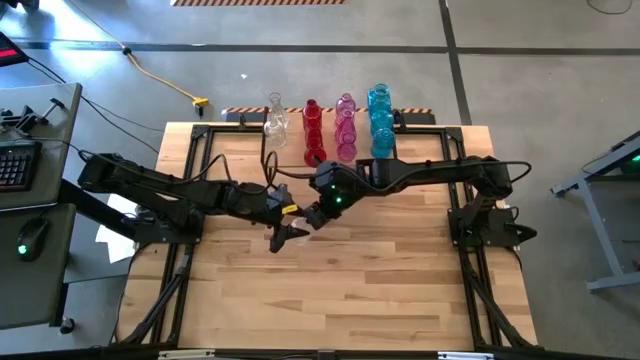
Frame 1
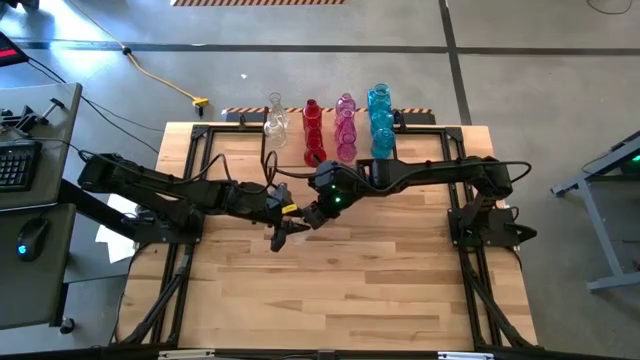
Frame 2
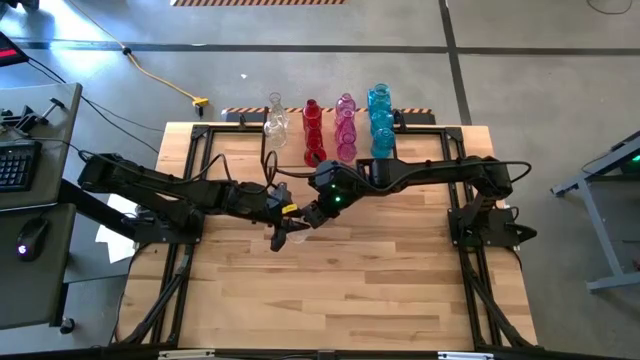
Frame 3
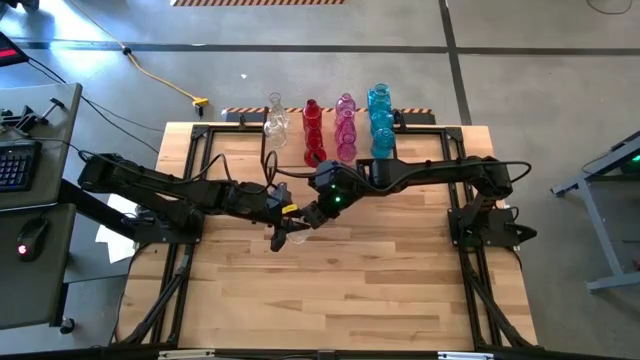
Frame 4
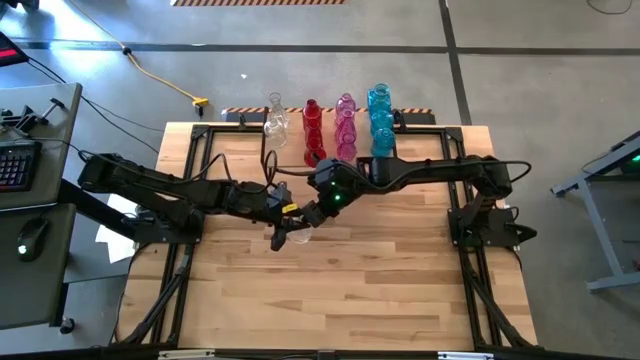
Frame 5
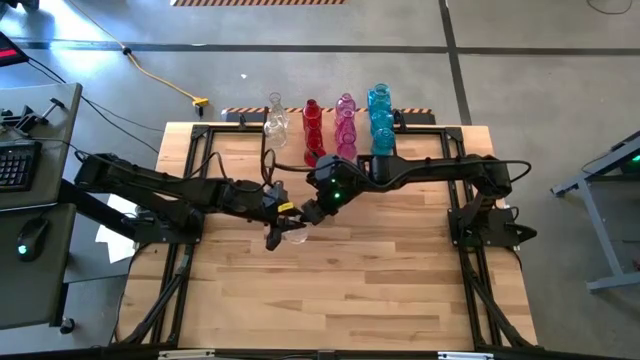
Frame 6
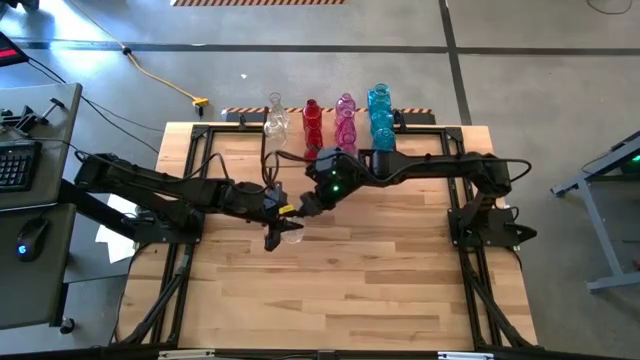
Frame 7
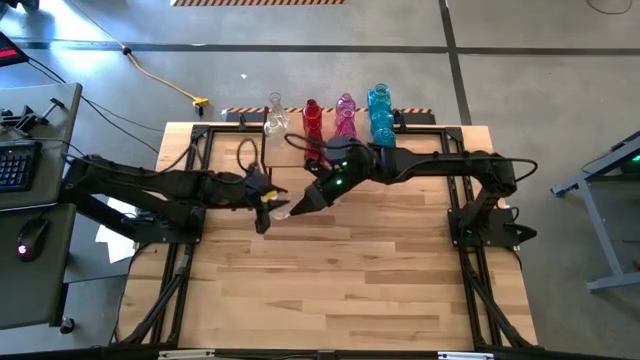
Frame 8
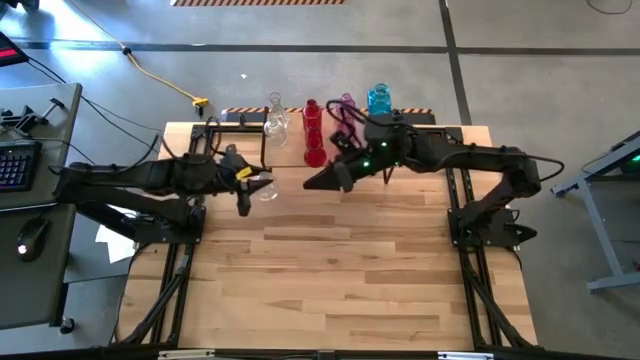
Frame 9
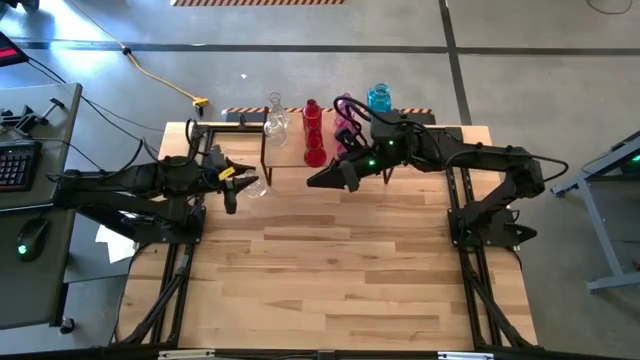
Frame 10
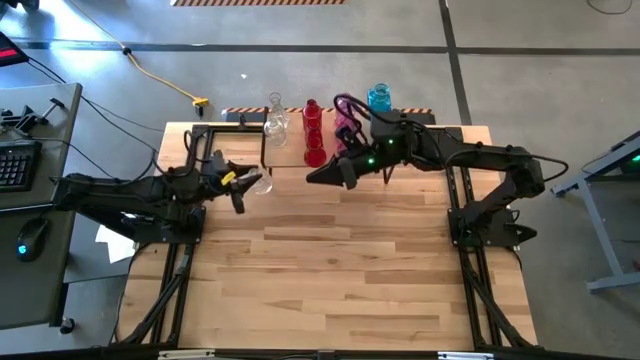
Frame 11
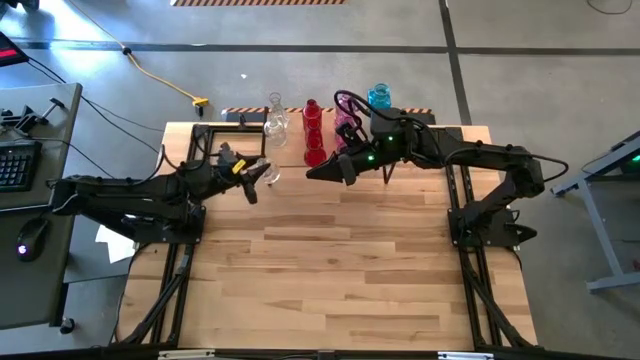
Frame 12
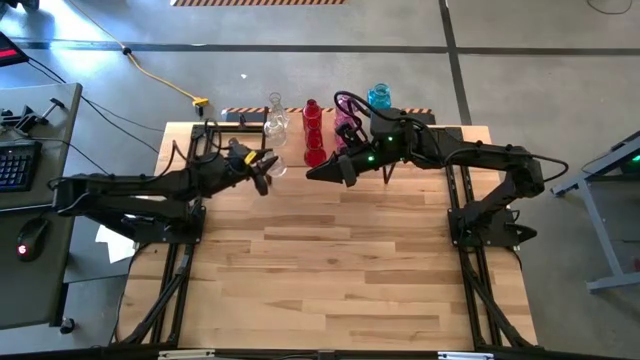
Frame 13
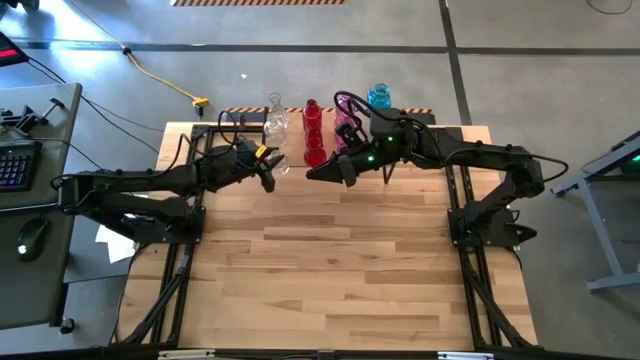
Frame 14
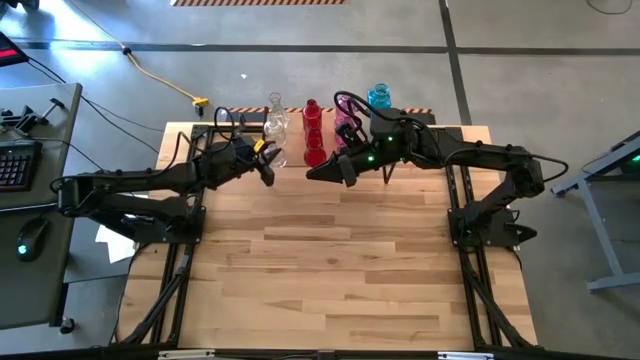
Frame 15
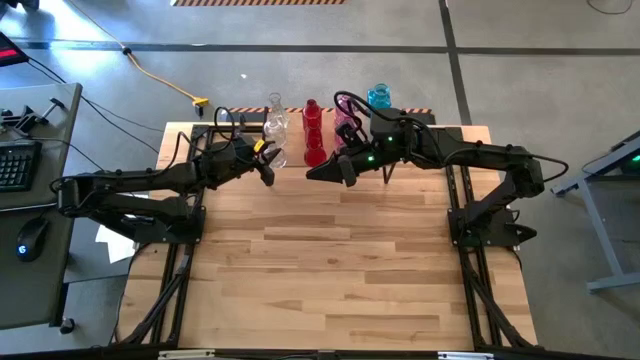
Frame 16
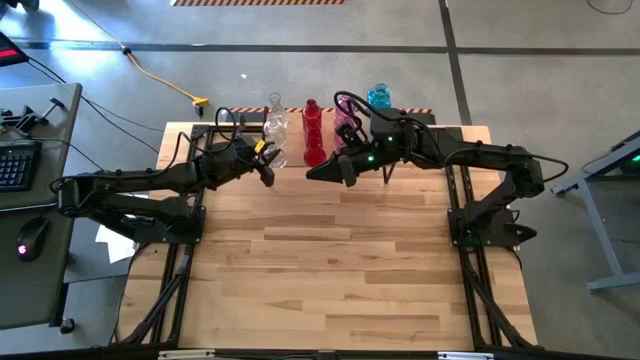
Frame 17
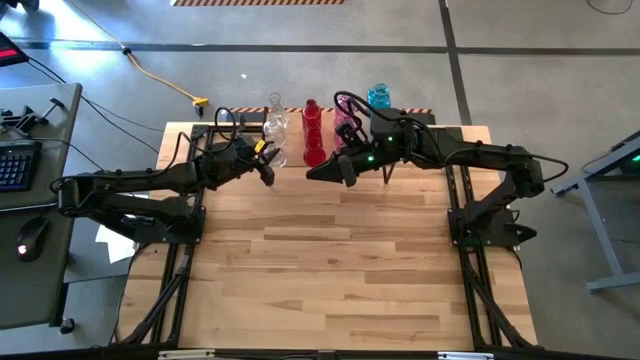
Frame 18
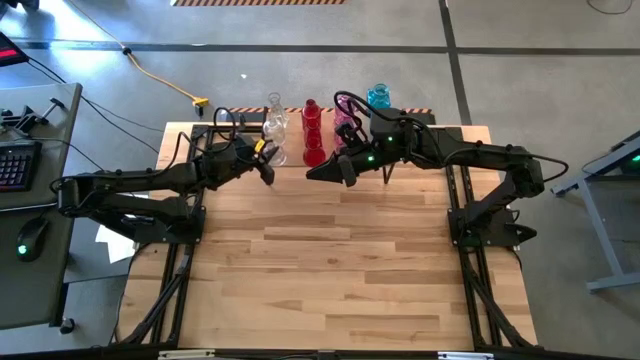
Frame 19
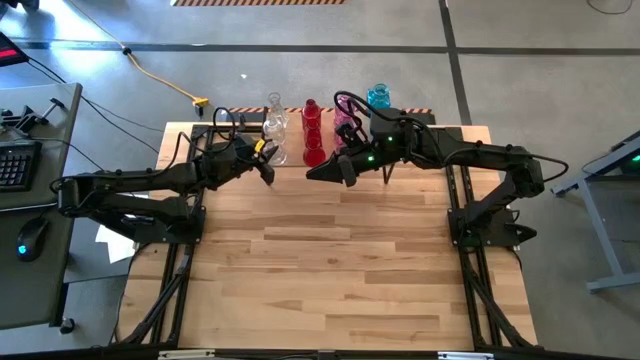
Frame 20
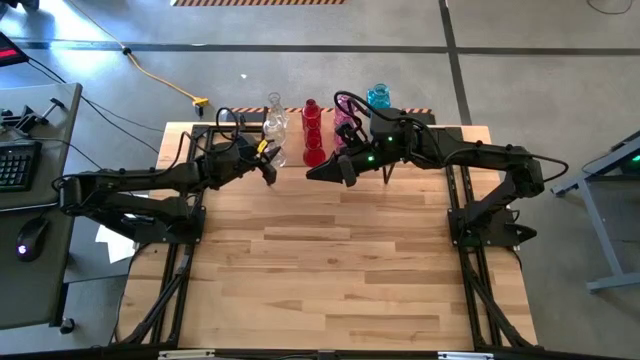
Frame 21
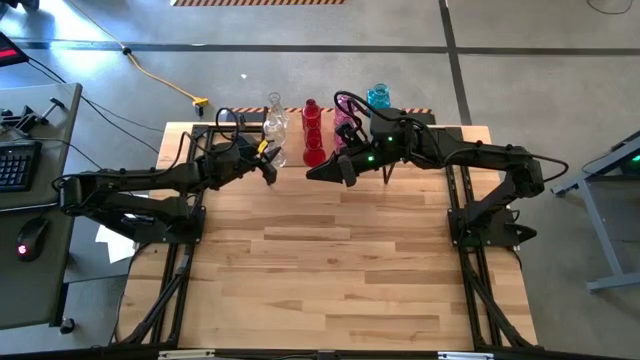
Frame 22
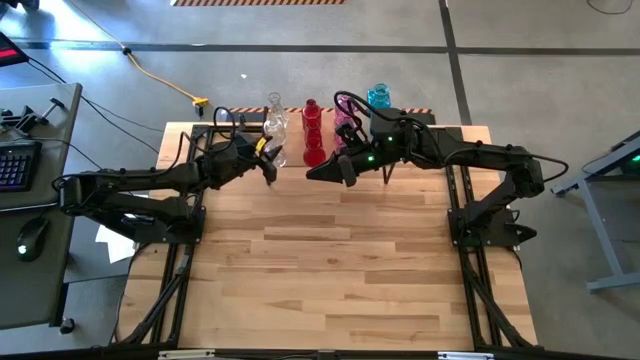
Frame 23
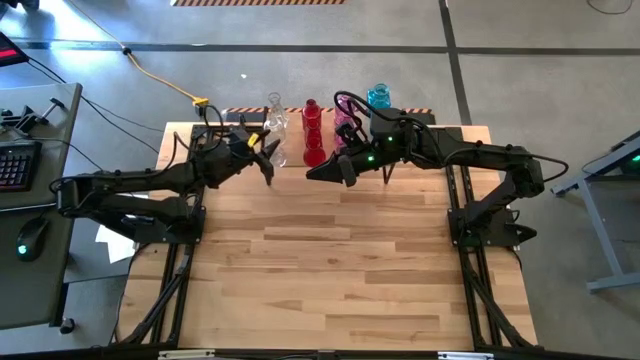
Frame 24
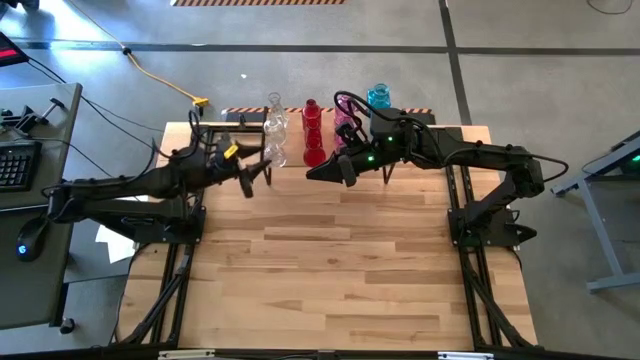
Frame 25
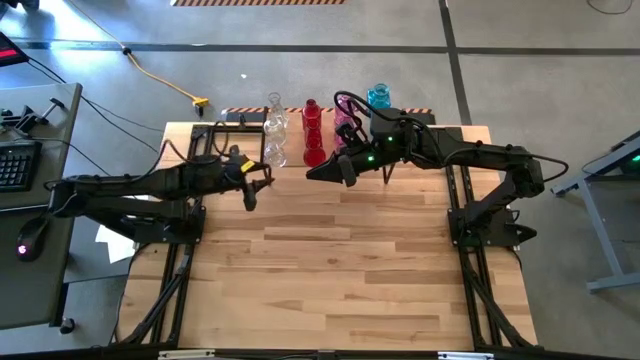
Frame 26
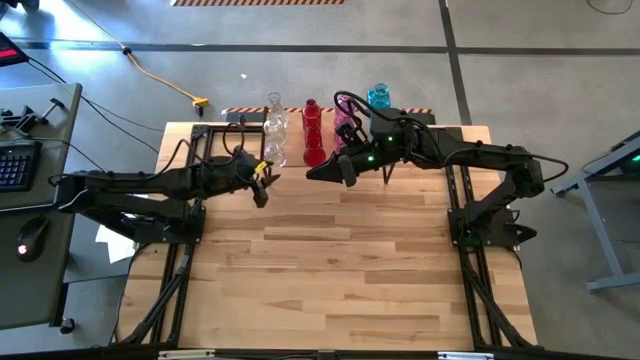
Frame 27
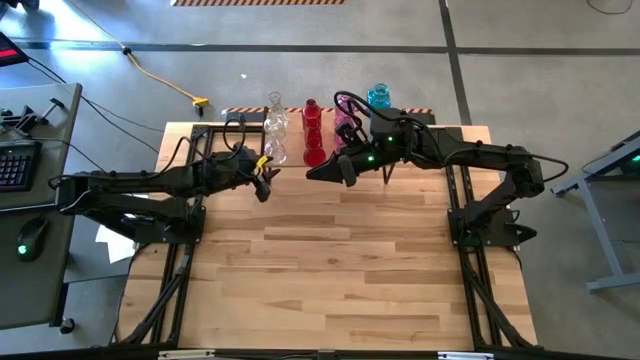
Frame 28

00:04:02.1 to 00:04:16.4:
Task: sort vases onto shelf
Put the transparent vase on the shelf aligned with the other transparent vases

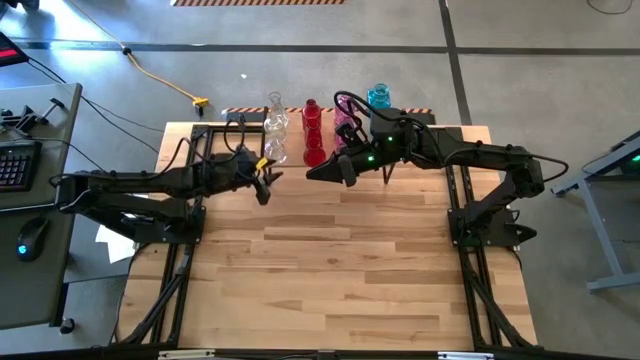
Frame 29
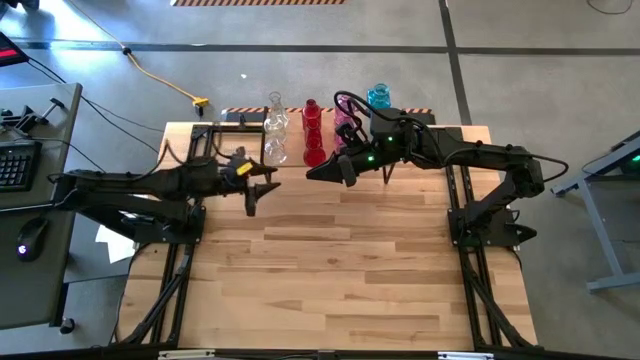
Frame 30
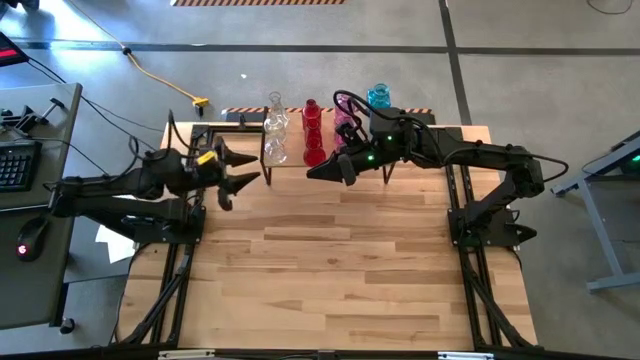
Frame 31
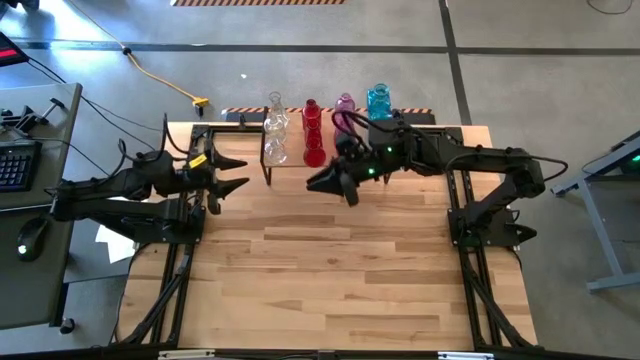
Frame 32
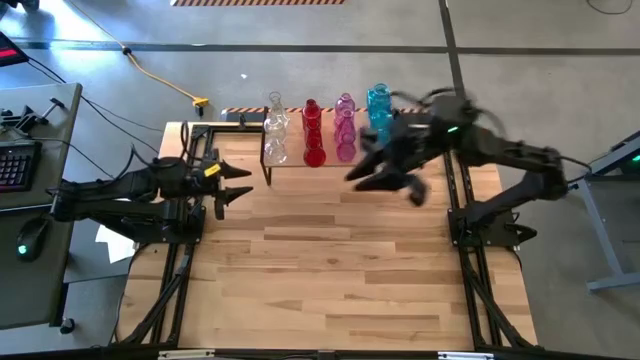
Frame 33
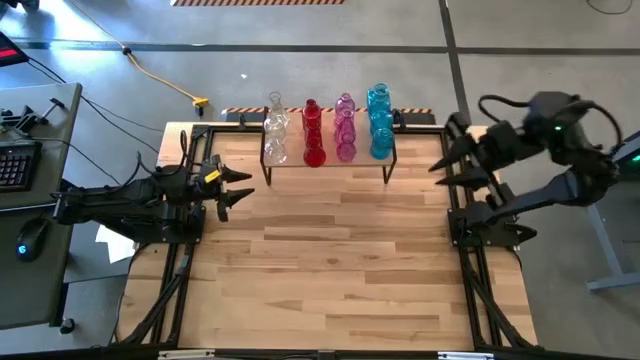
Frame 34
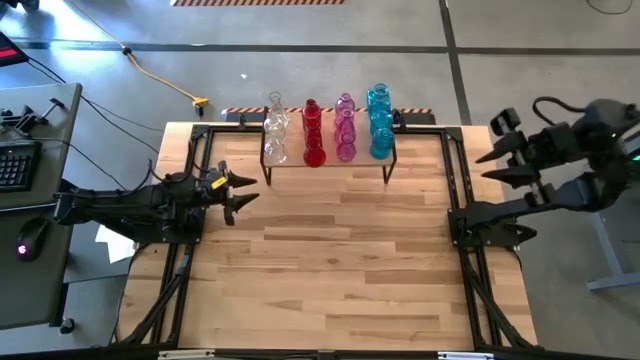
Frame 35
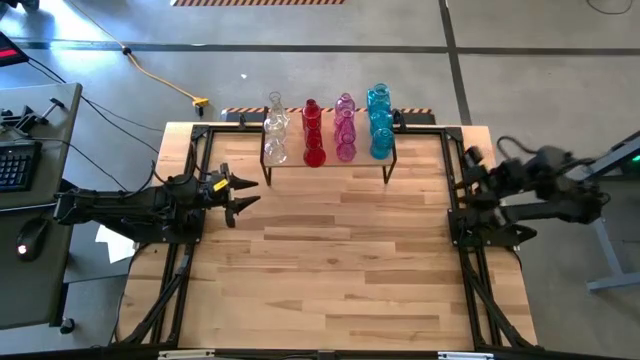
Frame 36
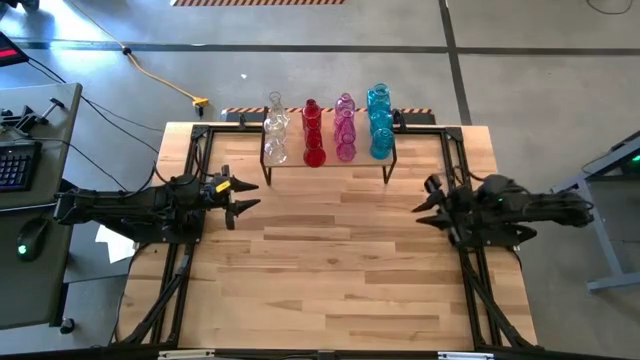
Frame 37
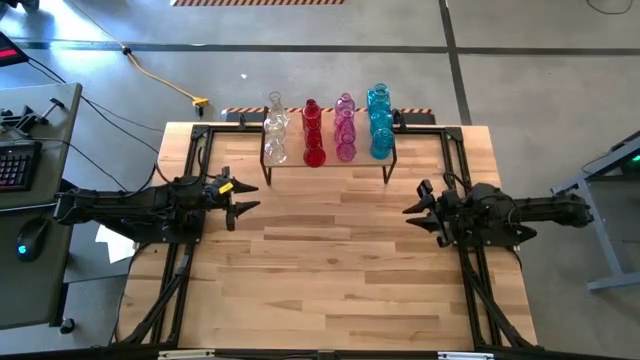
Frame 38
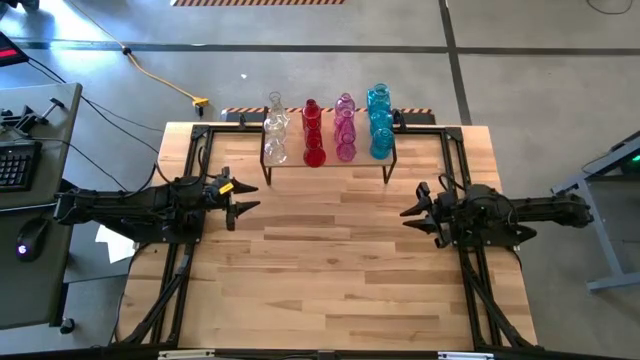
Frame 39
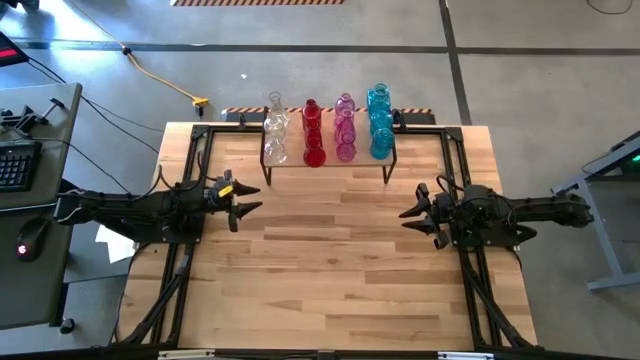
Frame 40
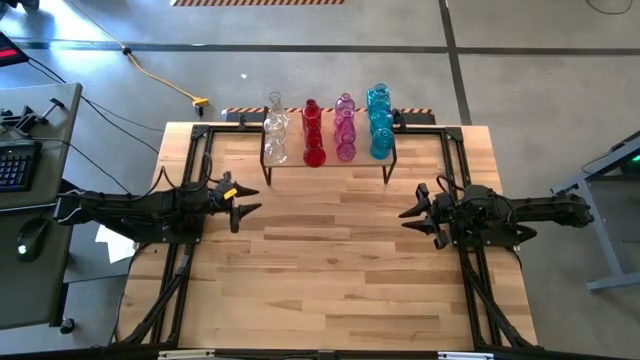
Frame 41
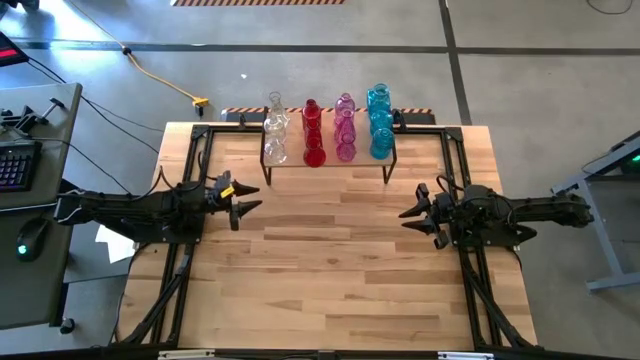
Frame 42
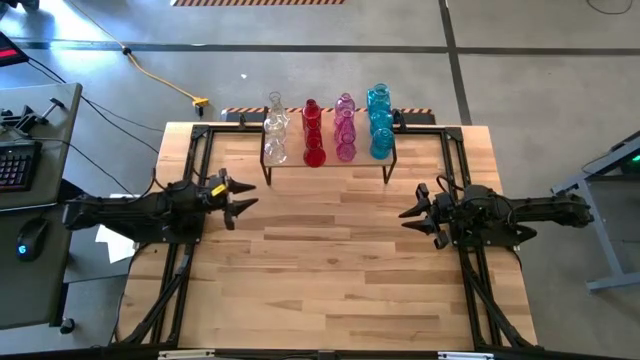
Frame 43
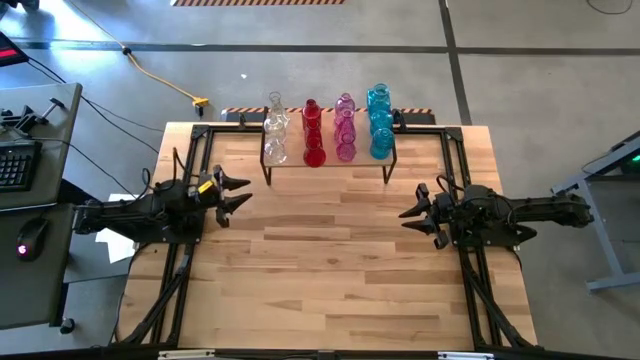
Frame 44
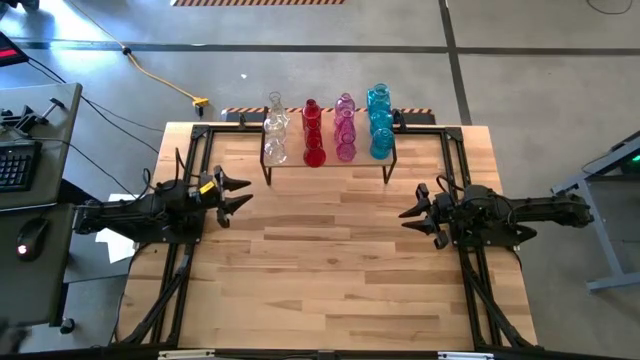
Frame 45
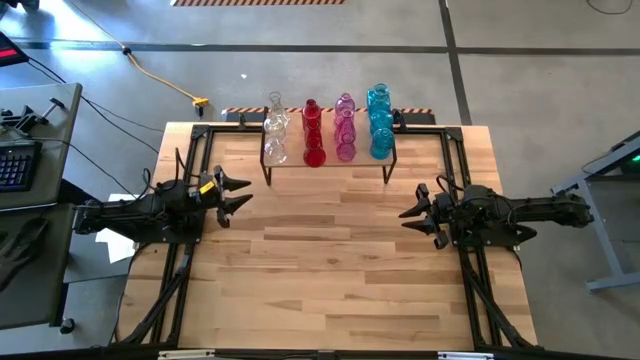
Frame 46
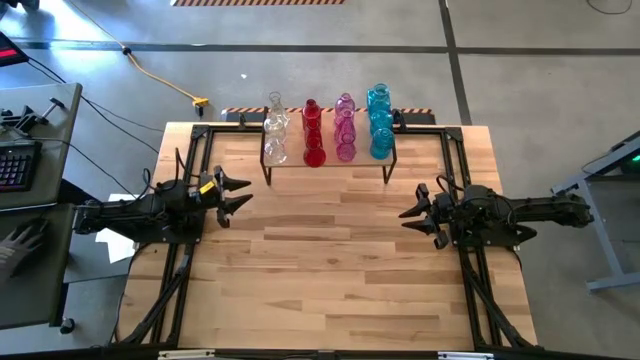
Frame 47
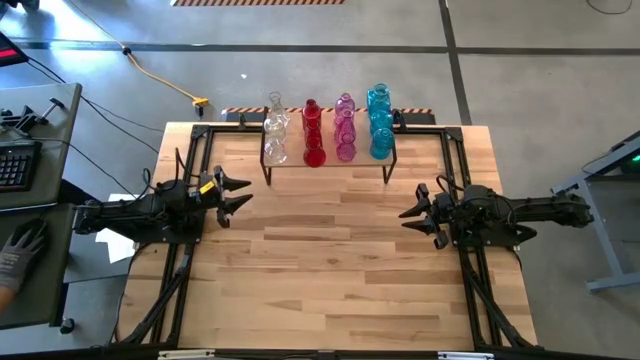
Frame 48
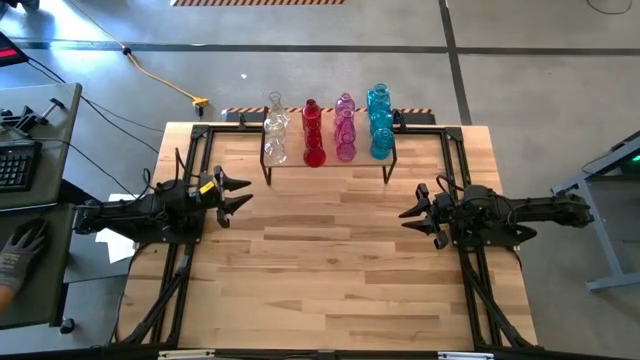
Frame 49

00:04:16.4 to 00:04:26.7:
Return to Home Position
